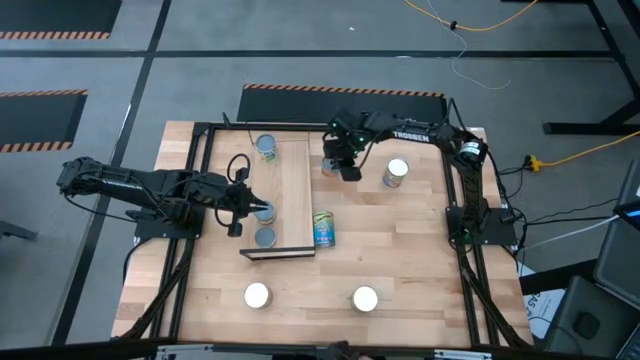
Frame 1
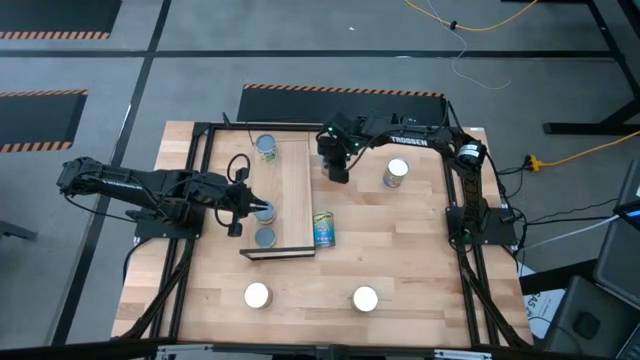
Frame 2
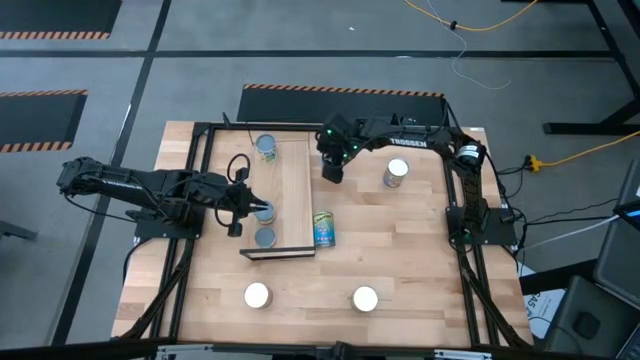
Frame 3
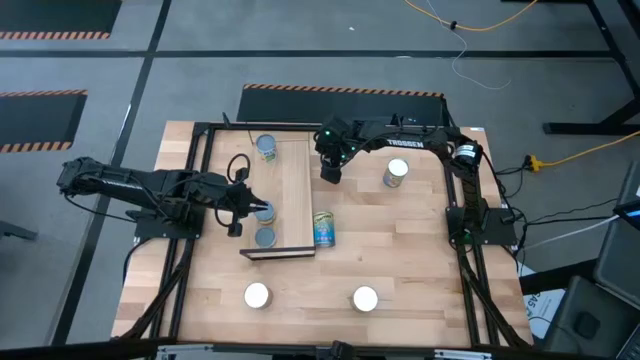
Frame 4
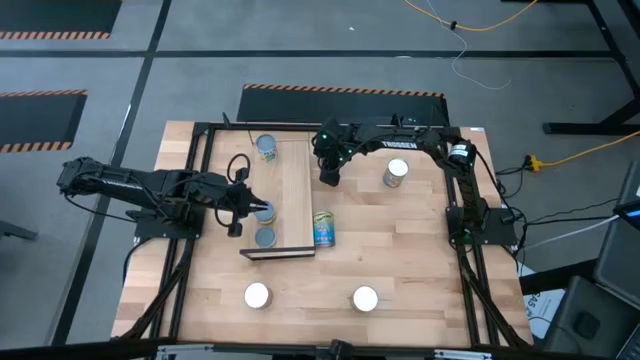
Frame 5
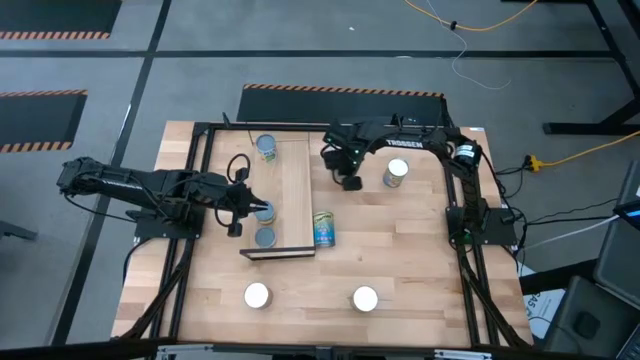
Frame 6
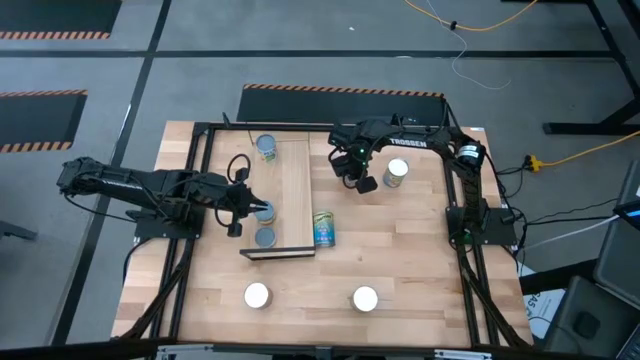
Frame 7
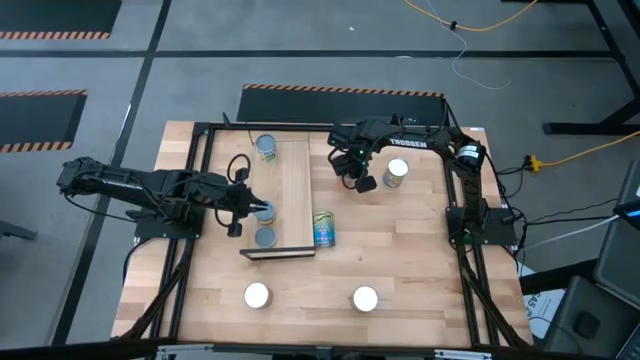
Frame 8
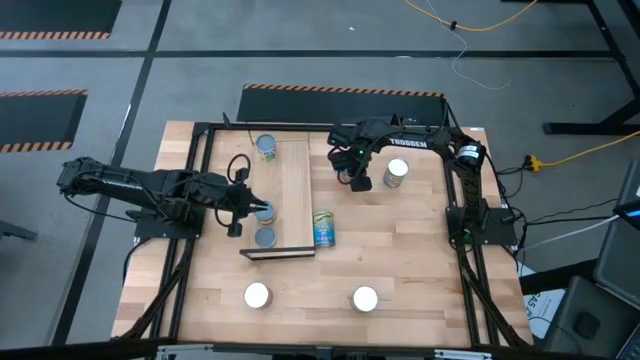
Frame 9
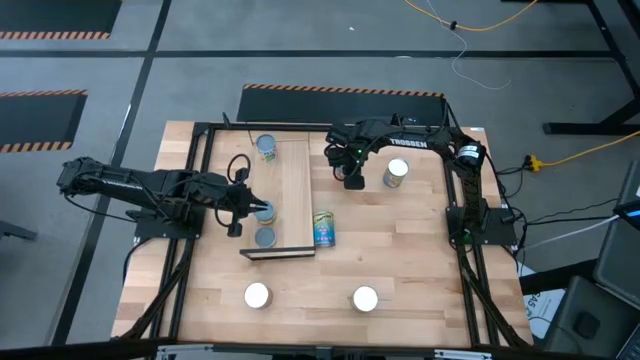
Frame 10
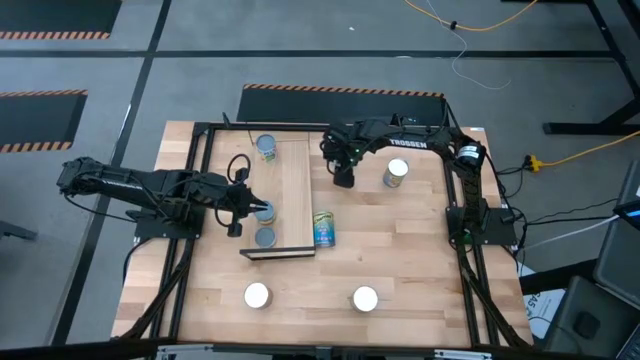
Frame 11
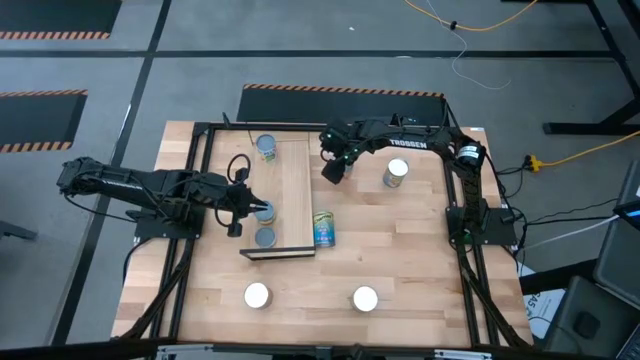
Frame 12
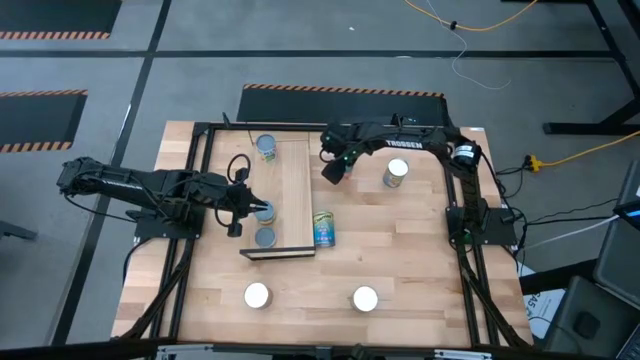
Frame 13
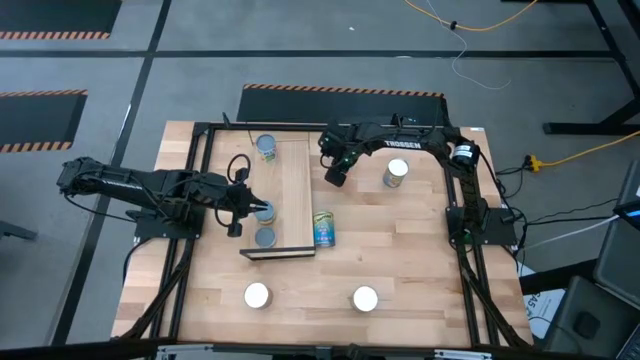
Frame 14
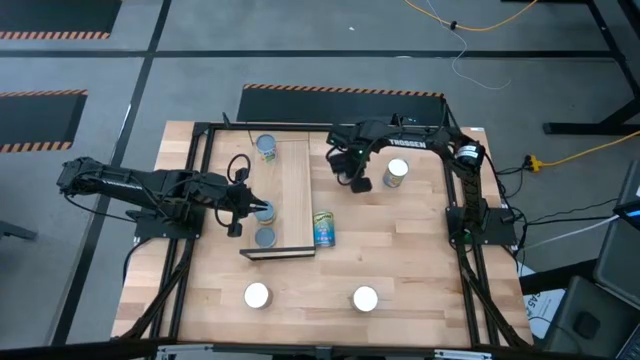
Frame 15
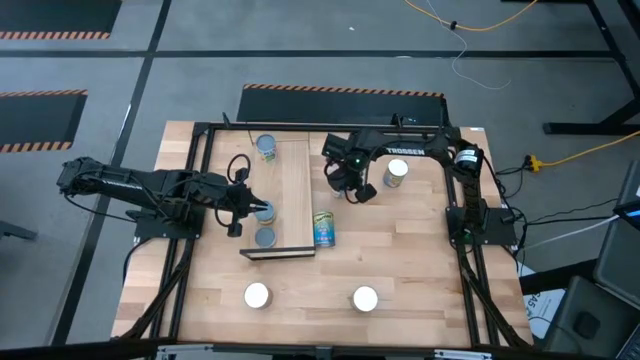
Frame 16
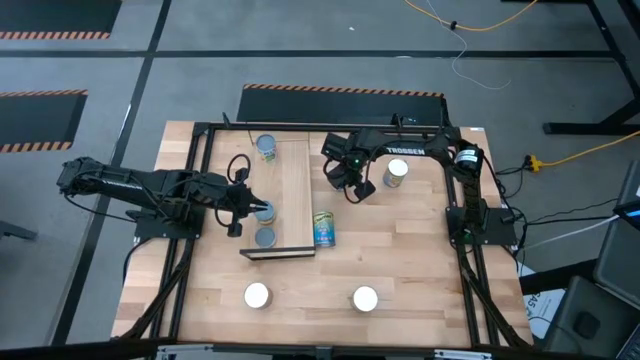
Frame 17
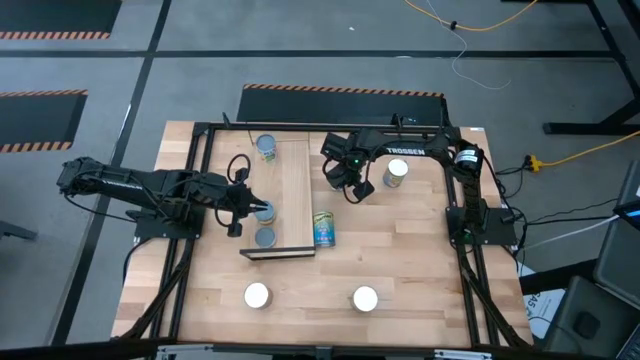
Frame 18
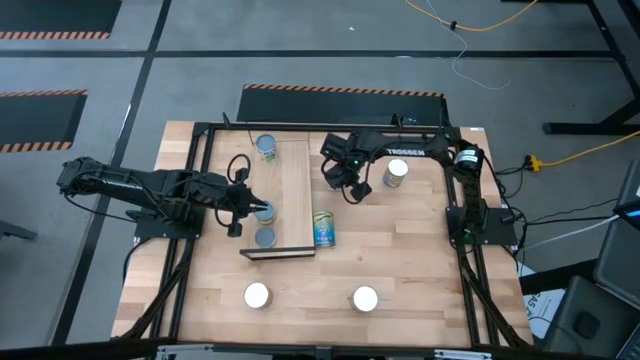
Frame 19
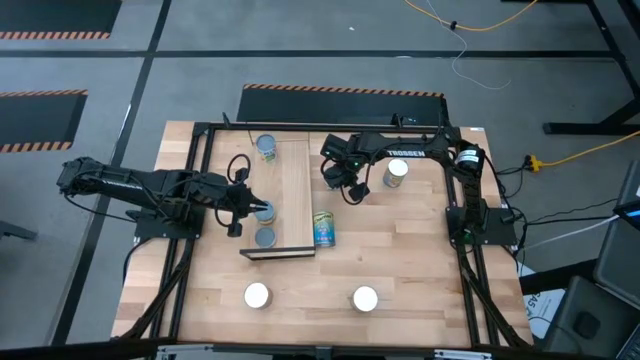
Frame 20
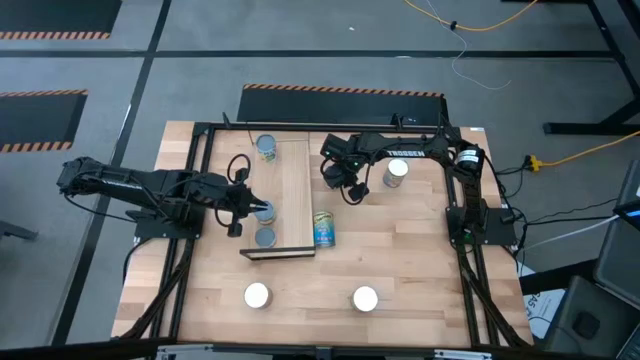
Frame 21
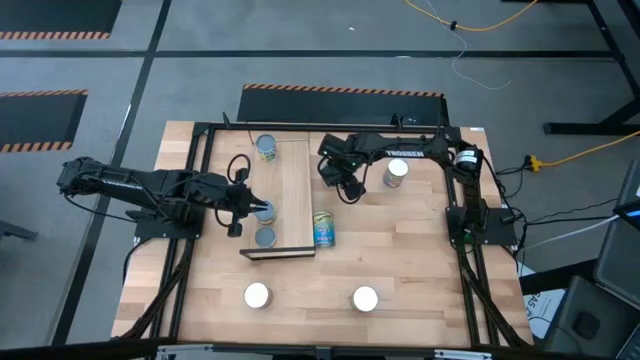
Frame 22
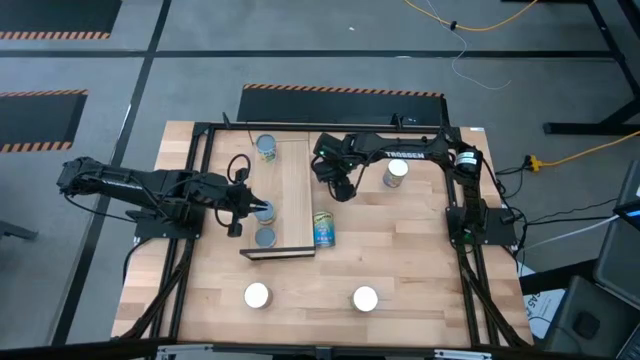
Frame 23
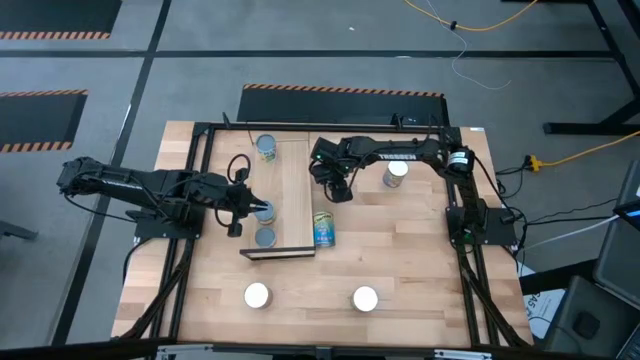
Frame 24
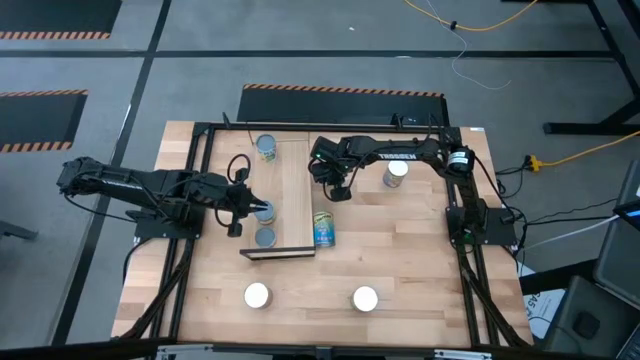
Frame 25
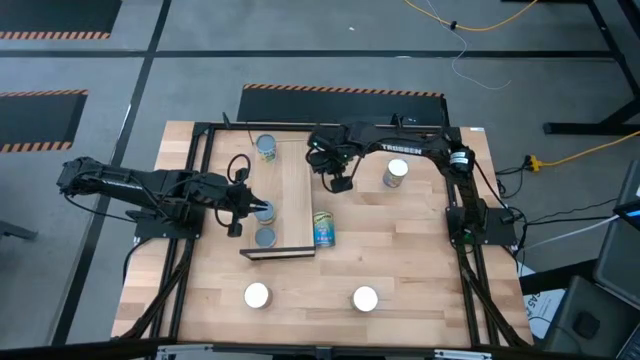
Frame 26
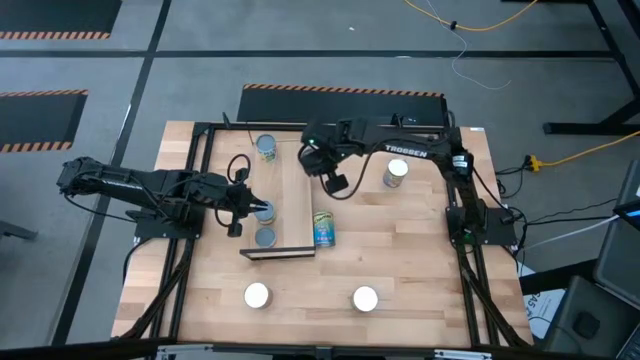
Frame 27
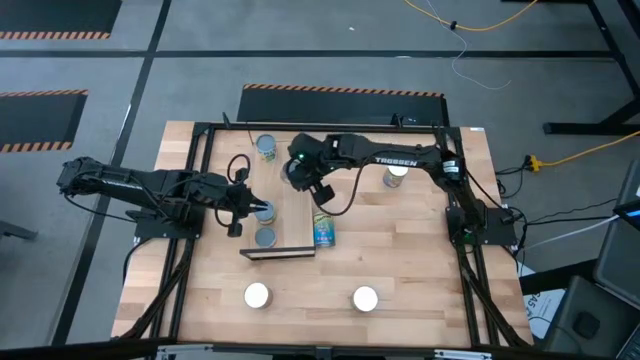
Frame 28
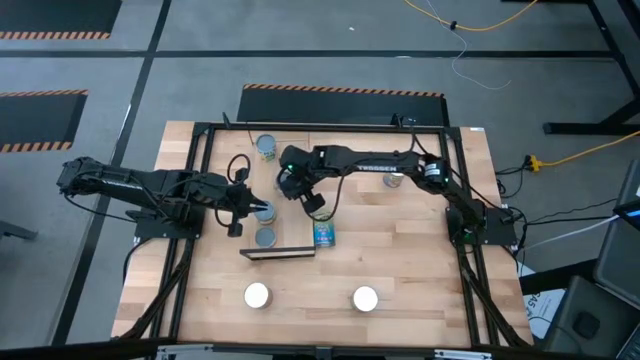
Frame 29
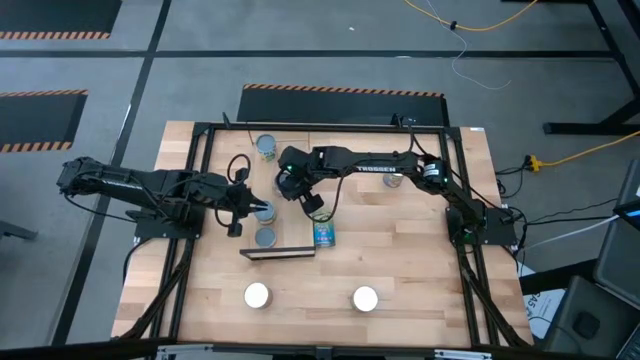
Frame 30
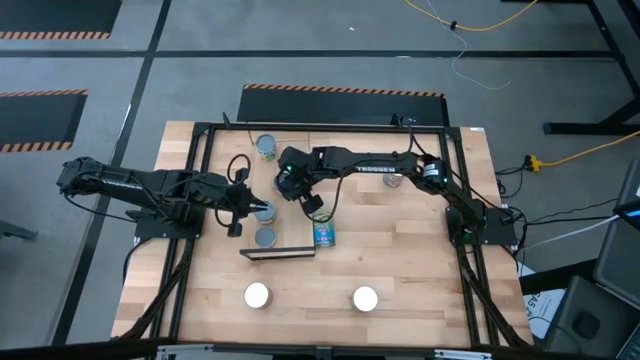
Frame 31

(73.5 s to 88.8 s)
Task: Pick and place cans onto a shelf
Put the small canned oranges on the shelf

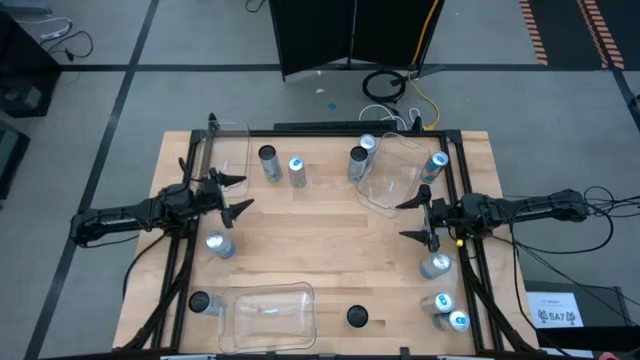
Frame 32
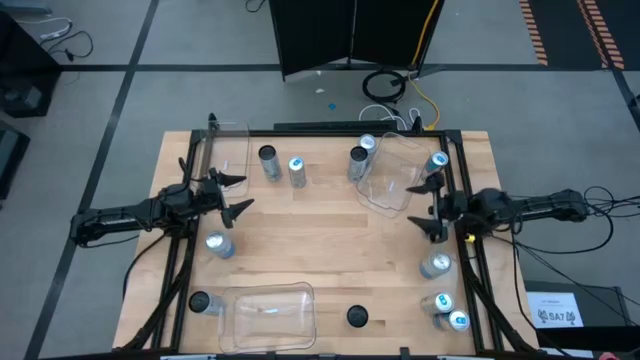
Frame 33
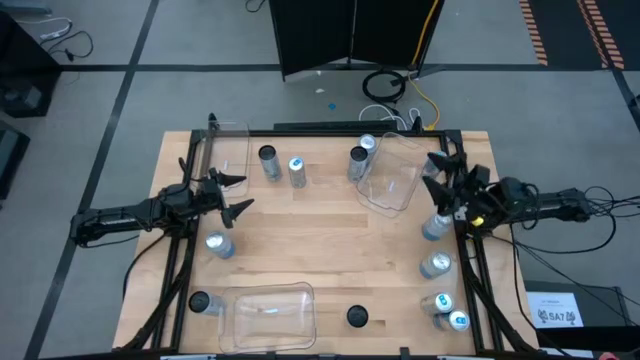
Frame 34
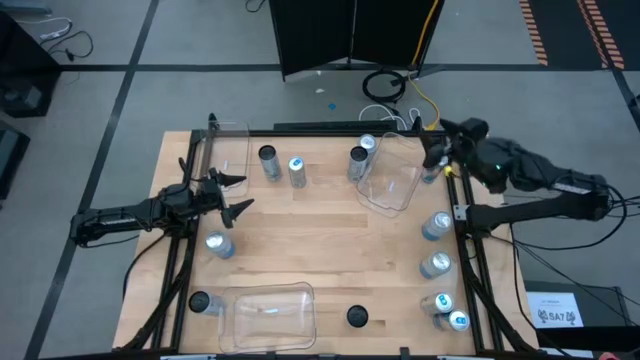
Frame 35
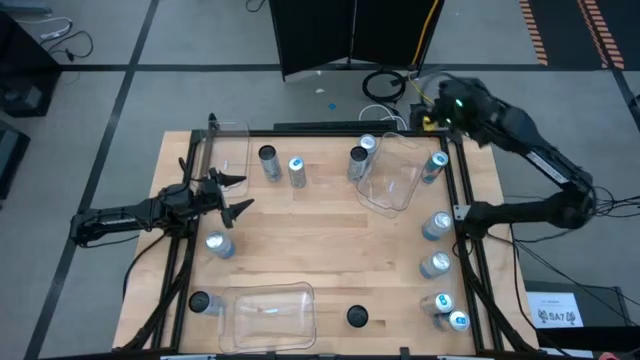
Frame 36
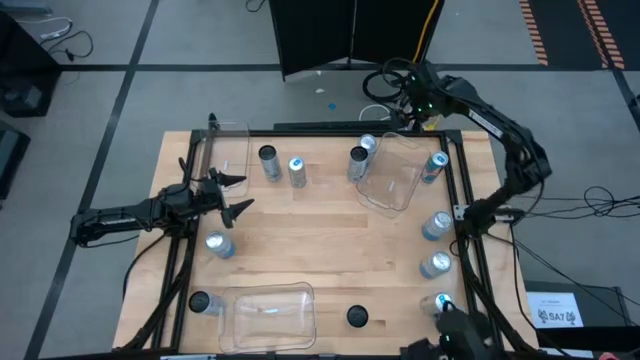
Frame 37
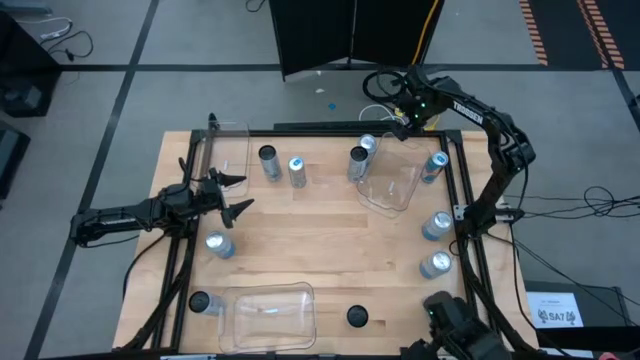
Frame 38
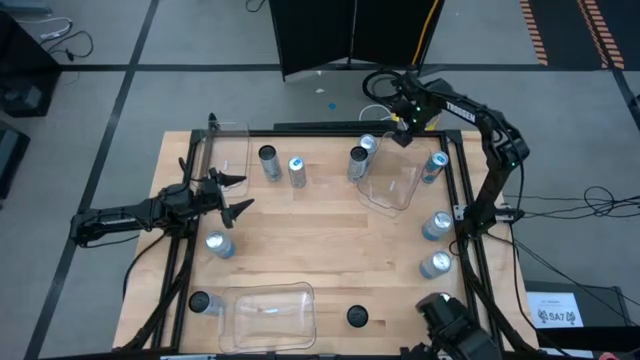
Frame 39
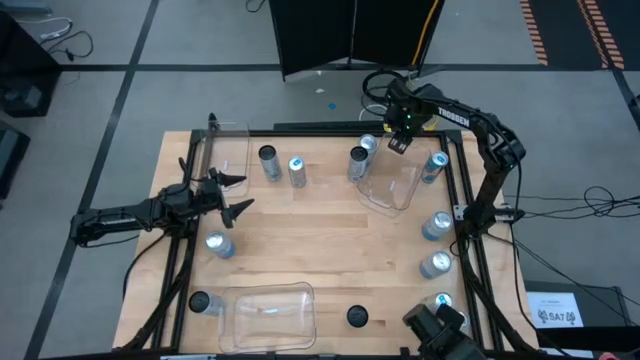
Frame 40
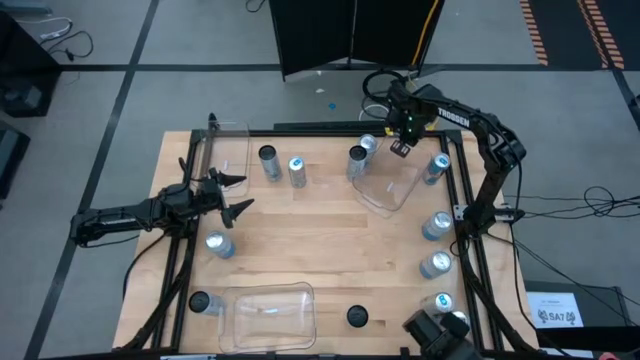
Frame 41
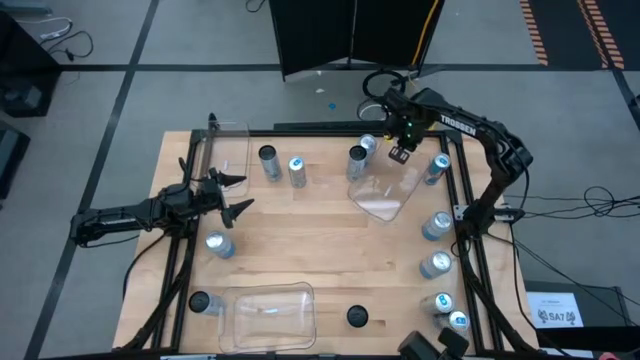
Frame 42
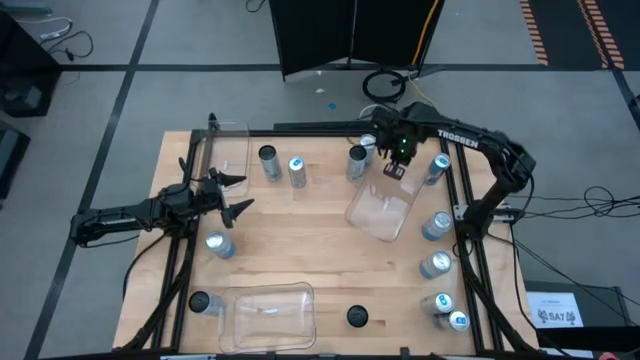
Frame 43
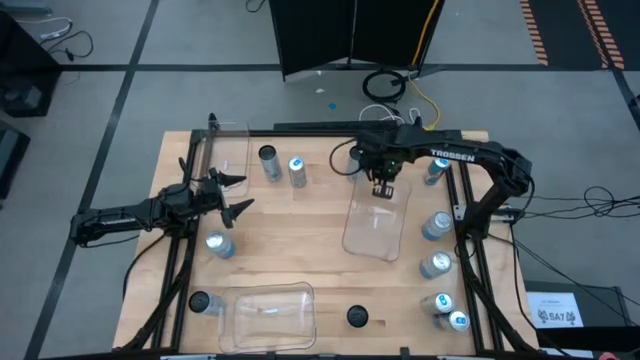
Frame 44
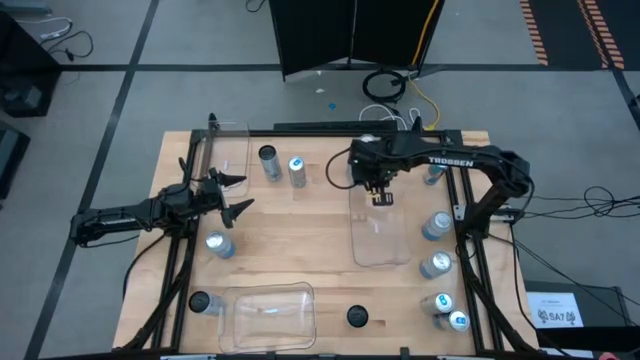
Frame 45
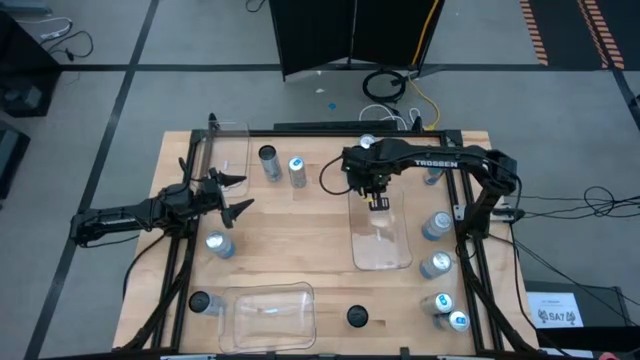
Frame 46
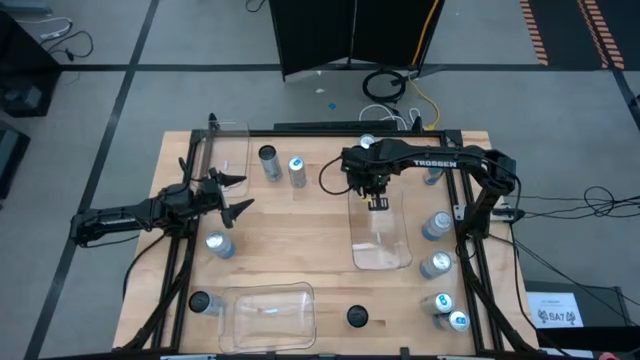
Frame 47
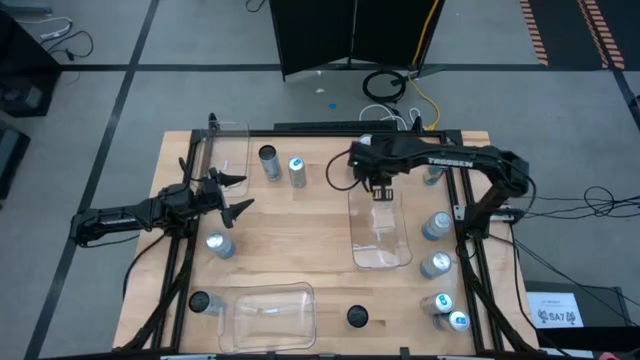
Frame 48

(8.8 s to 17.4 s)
Task: Sort soda cans
Move the top right transparent bin to the middle right of the table
